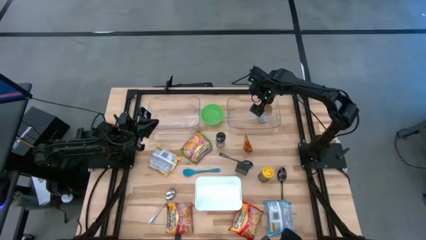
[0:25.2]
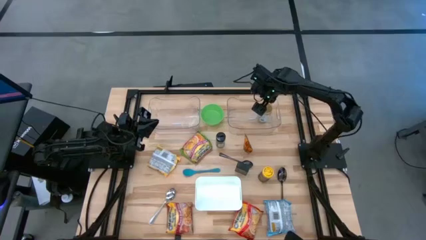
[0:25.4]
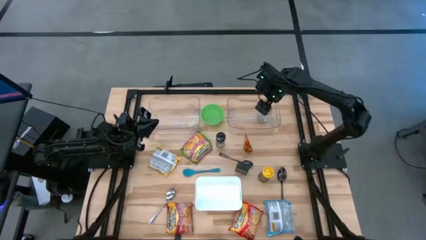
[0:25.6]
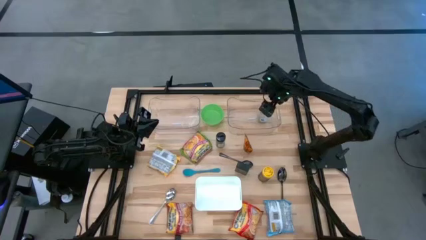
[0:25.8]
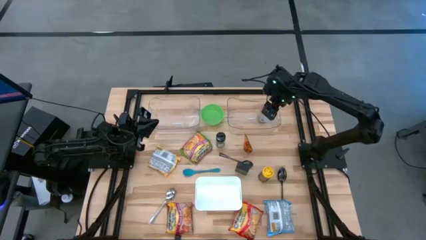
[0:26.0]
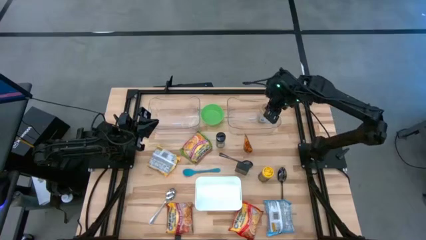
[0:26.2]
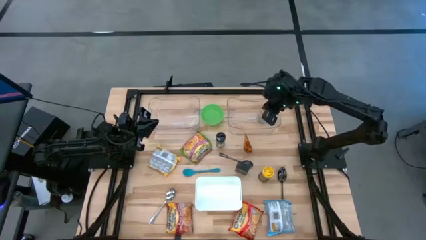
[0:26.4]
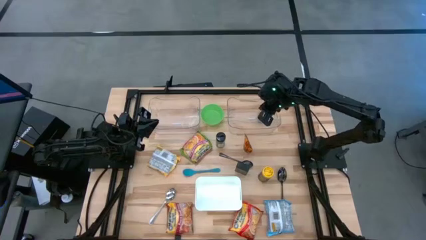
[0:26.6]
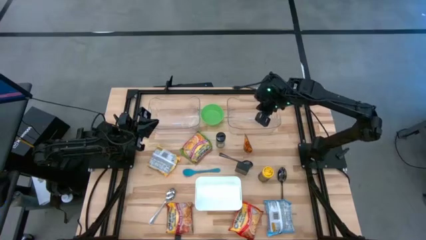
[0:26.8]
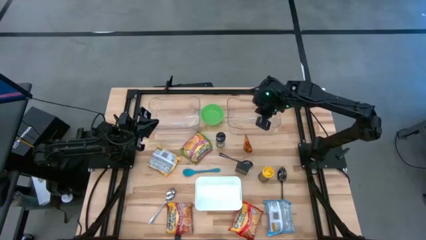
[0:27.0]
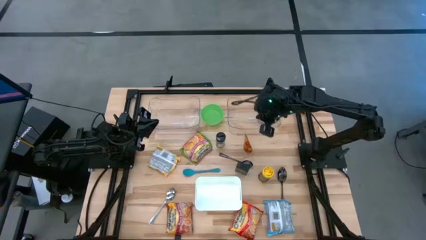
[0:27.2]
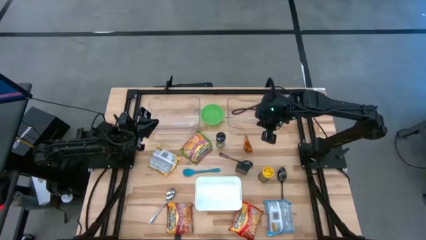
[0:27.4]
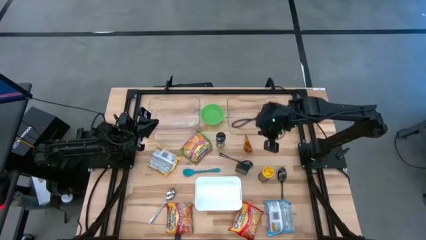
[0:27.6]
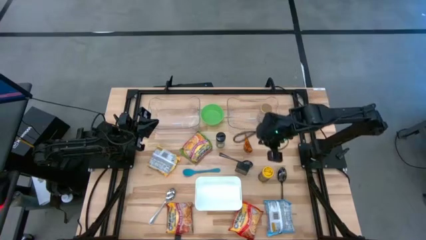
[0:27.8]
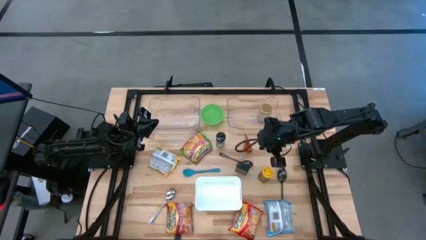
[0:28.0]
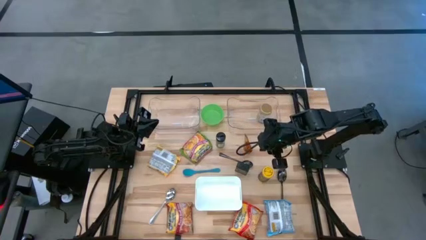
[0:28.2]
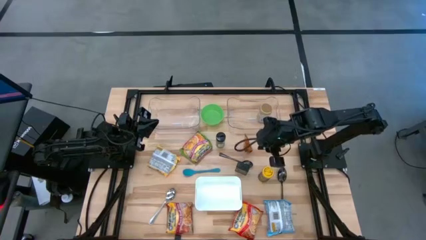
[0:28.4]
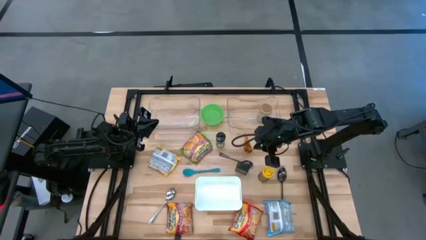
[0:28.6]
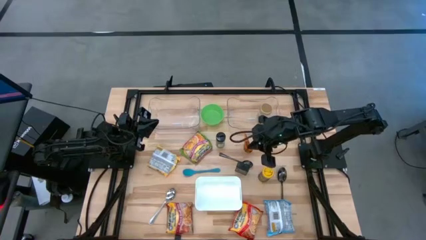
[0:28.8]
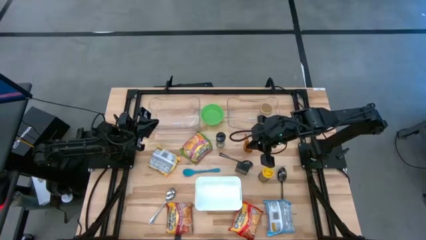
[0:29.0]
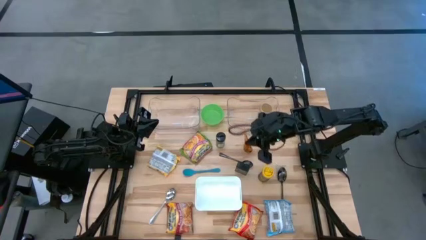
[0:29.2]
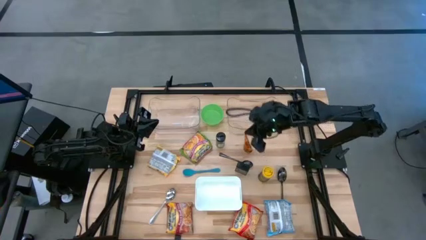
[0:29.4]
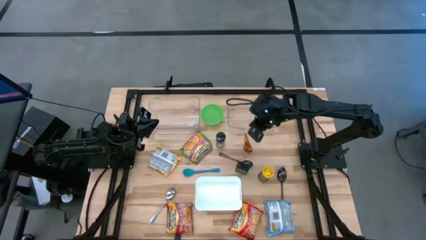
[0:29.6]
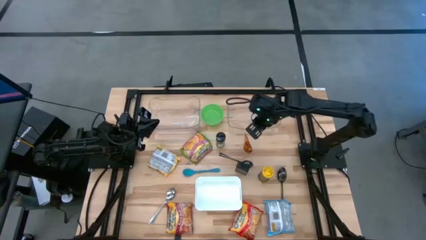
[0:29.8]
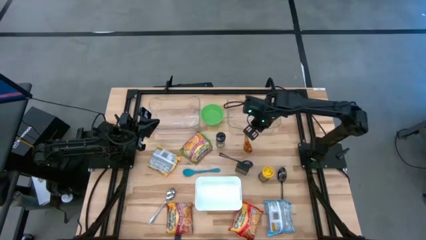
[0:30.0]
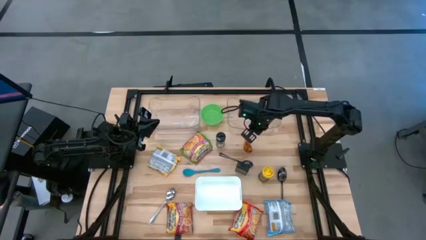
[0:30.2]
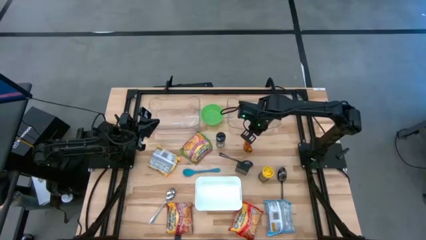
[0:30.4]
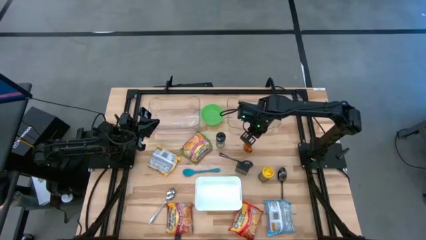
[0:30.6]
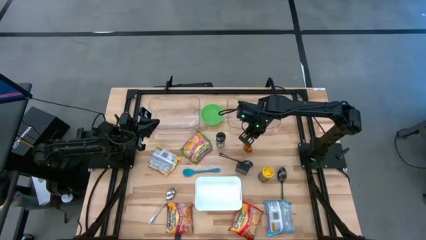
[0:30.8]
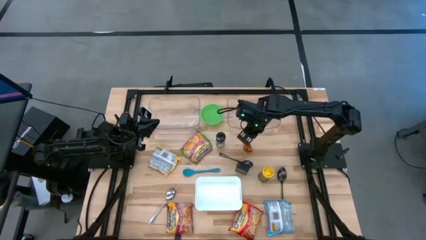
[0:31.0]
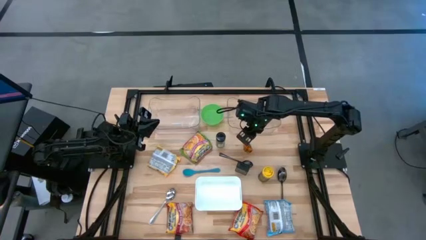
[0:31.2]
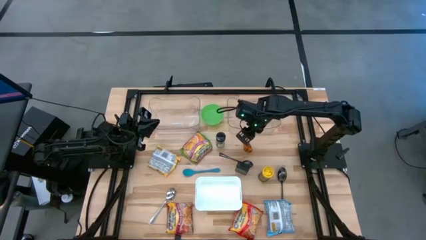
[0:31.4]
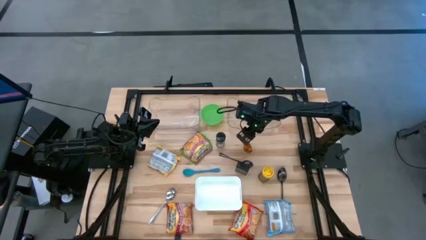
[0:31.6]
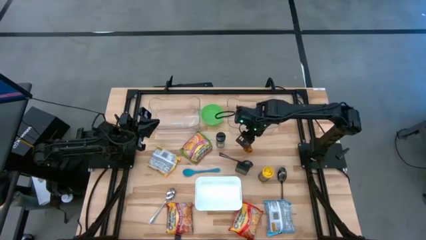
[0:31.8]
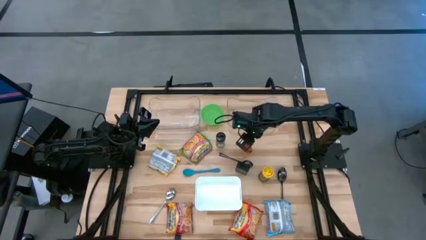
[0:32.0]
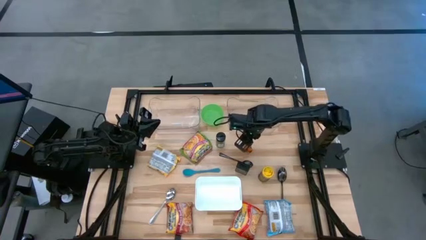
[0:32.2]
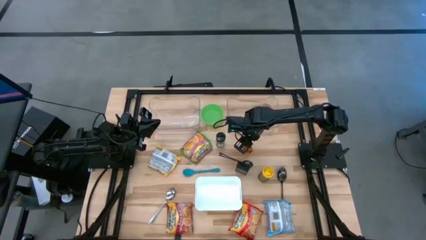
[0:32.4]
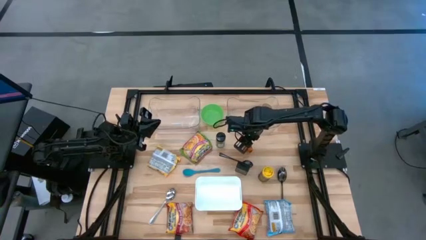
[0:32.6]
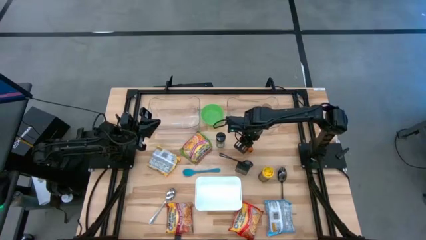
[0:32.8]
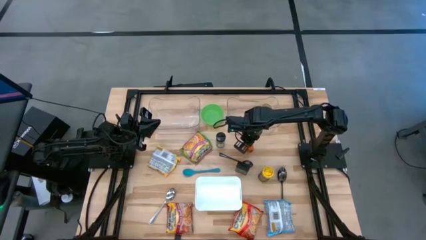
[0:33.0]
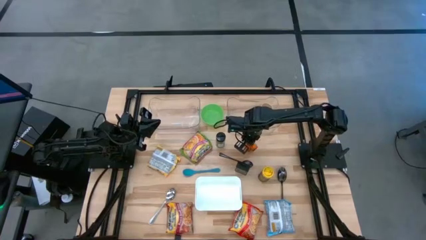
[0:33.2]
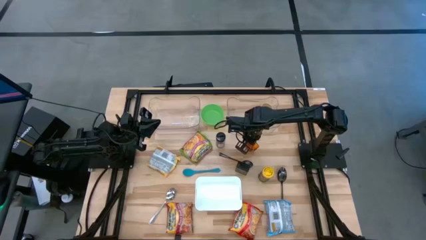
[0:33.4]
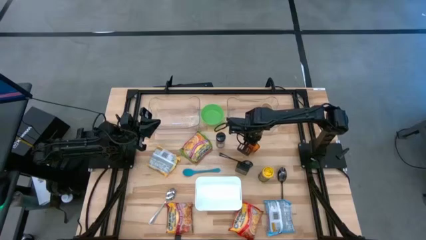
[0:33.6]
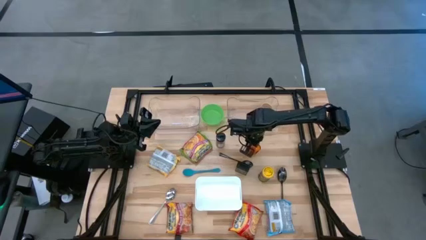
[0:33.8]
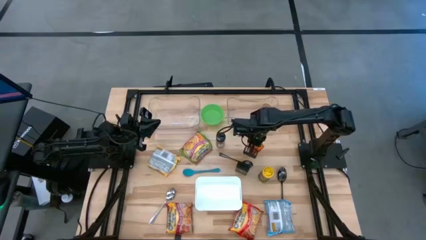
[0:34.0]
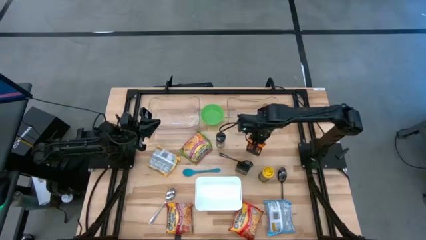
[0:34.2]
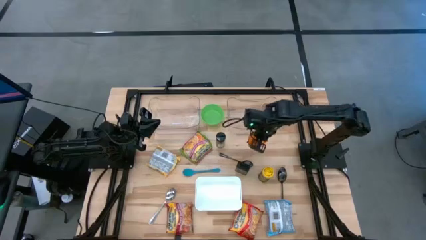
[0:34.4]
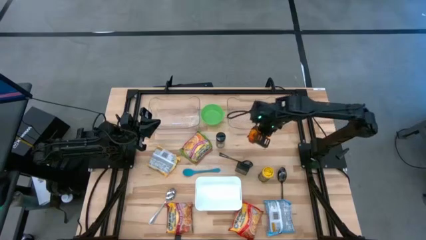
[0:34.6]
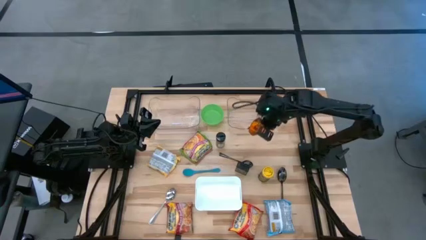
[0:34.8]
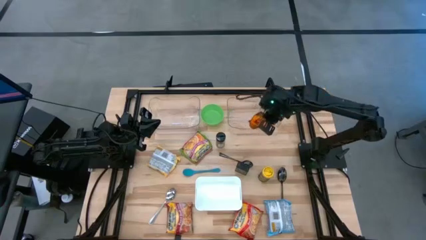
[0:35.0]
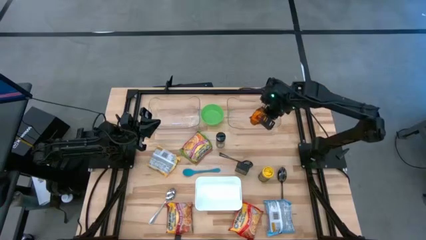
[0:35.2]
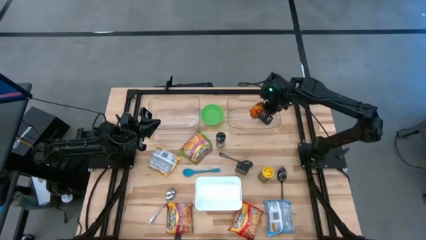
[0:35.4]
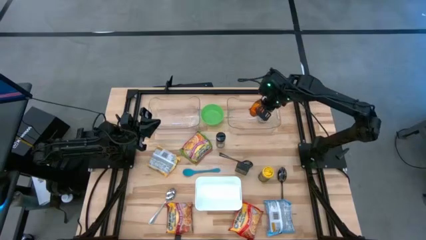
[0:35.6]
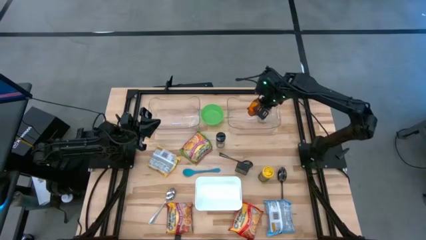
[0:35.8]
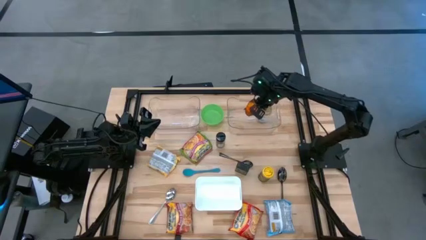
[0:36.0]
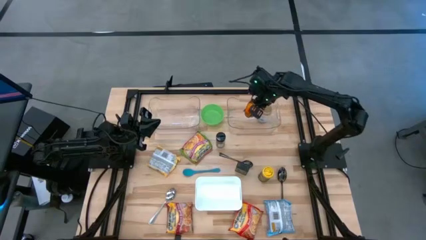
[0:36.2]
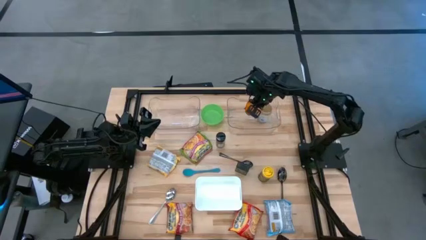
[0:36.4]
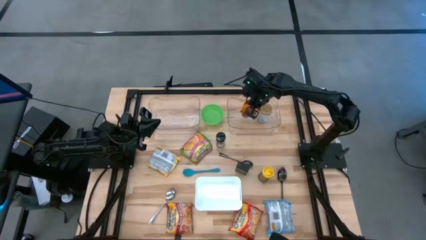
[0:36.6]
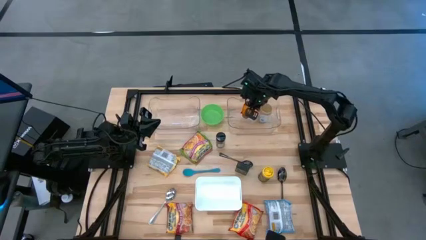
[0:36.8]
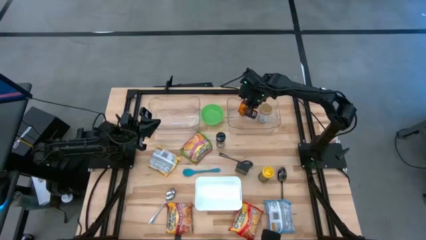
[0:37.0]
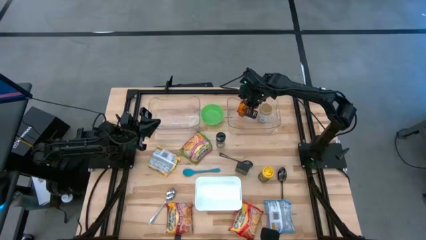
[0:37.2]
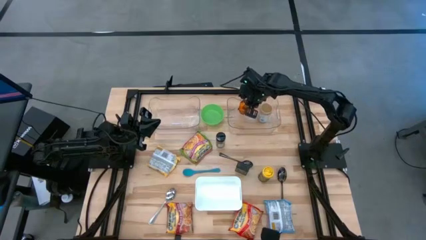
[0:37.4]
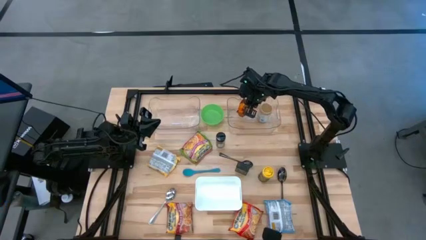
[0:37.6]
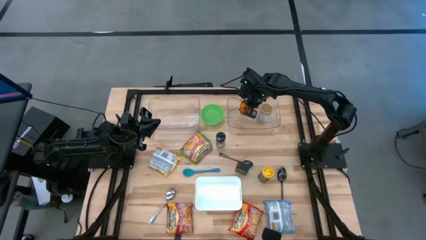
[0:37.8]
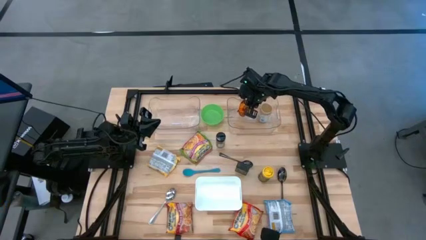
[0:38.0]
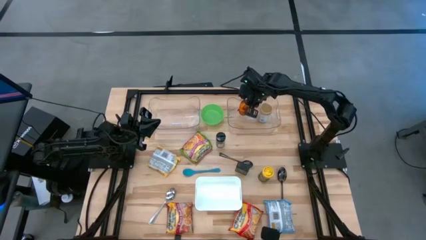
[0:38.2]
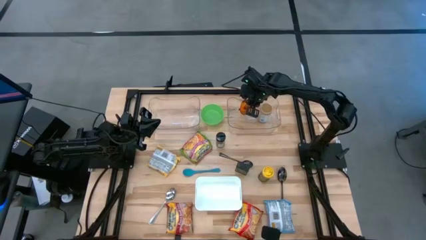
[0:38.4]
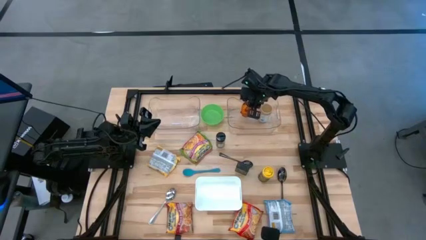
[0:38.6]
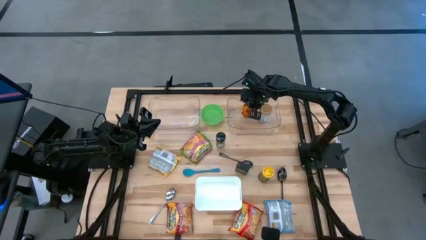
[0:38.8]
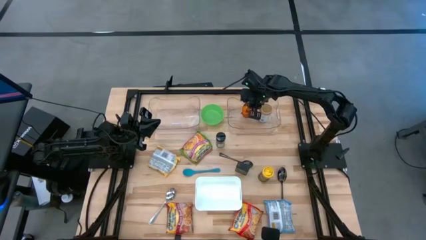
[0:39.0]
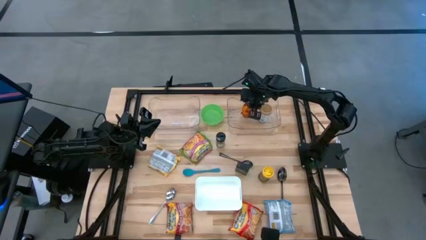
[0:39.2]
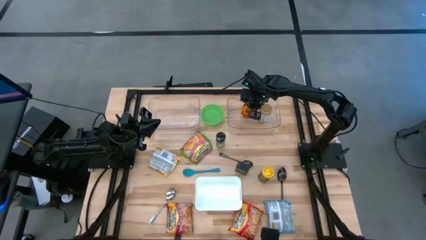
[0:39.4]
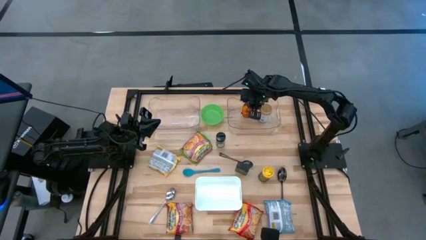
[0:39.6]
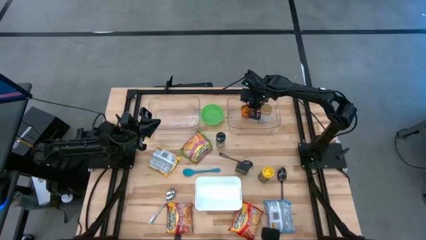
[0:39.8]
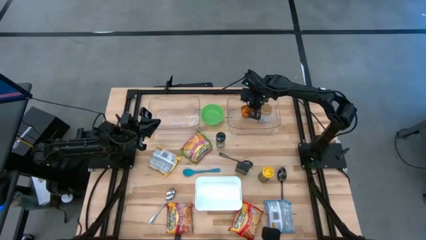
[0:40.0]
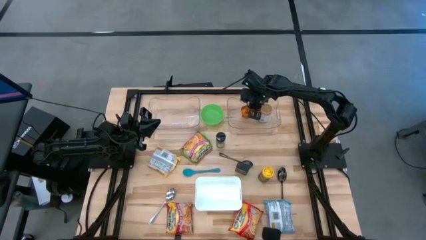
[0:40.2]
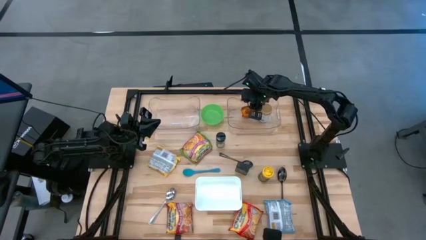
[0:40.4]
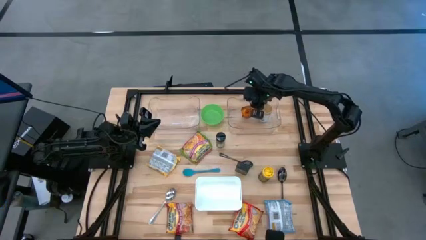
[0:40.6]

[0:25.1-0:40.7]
Task: Pick & Place Food Item
Put the orange seasoning into the right transparent bin
